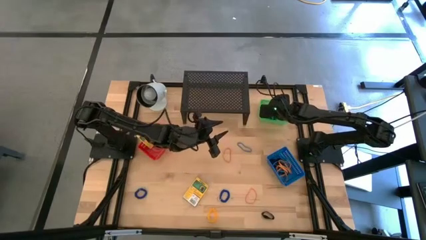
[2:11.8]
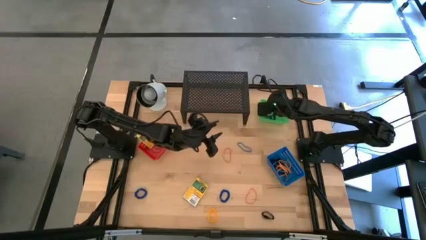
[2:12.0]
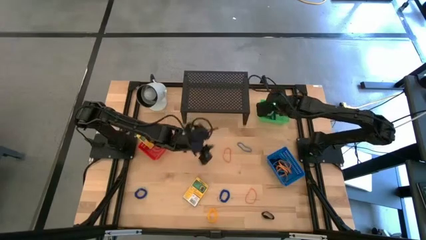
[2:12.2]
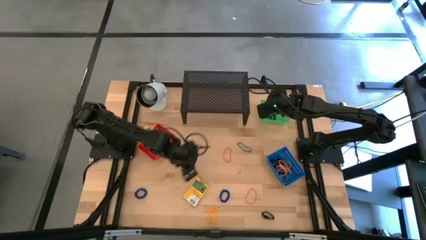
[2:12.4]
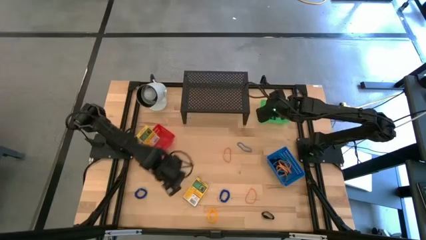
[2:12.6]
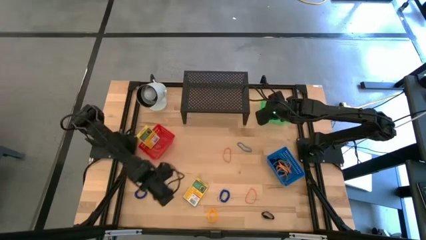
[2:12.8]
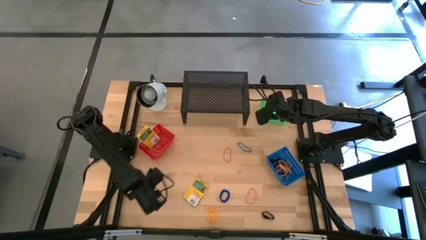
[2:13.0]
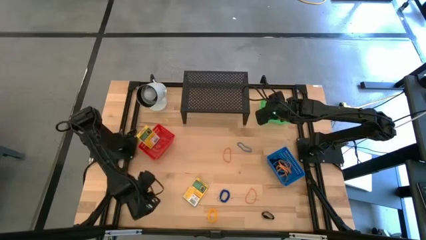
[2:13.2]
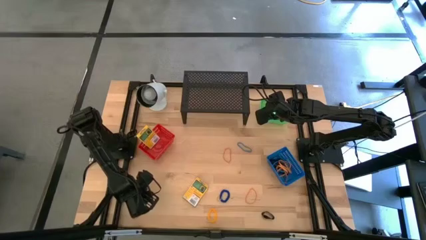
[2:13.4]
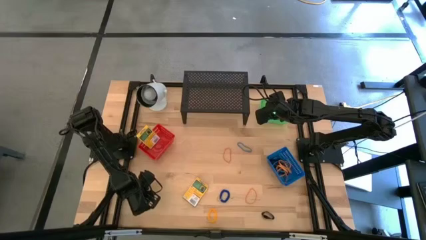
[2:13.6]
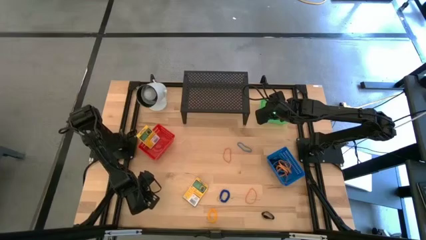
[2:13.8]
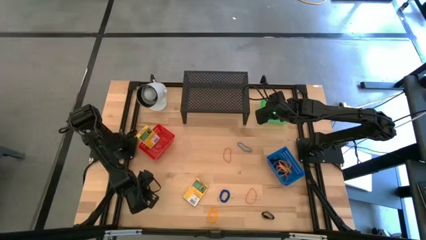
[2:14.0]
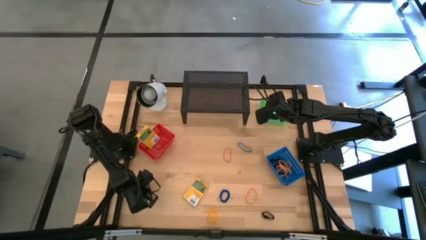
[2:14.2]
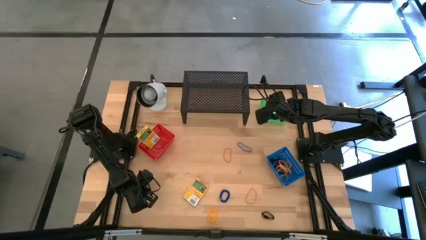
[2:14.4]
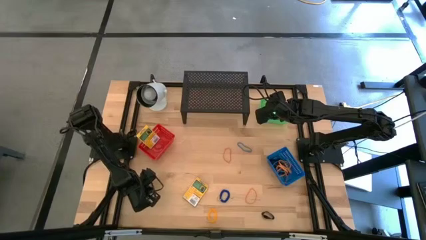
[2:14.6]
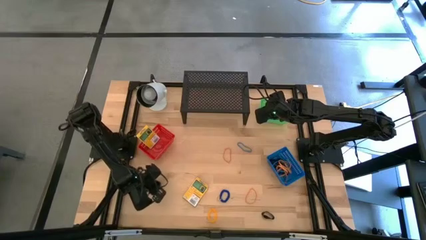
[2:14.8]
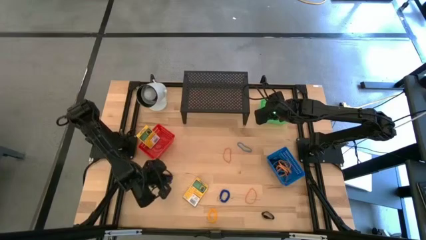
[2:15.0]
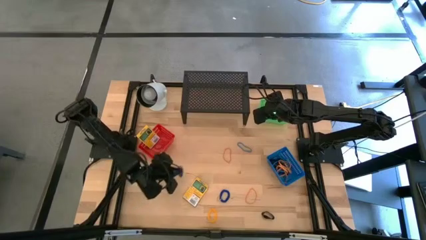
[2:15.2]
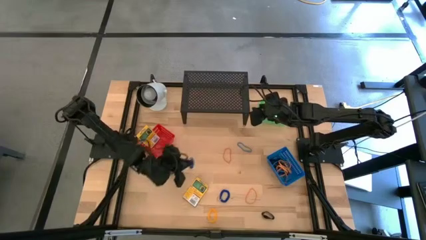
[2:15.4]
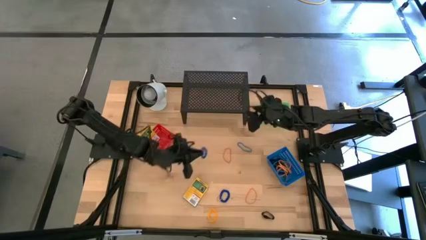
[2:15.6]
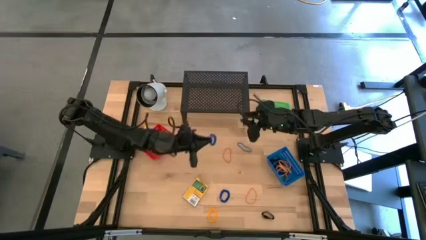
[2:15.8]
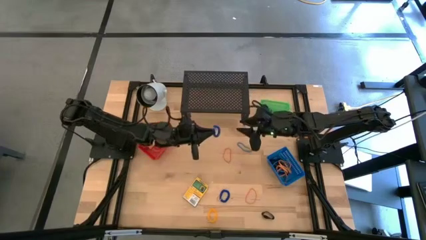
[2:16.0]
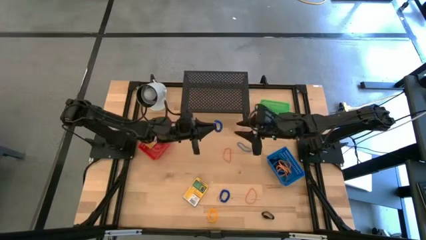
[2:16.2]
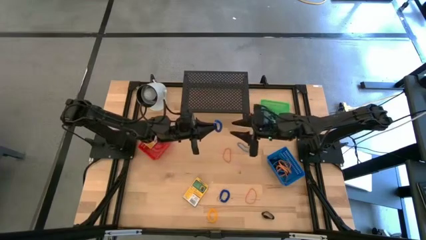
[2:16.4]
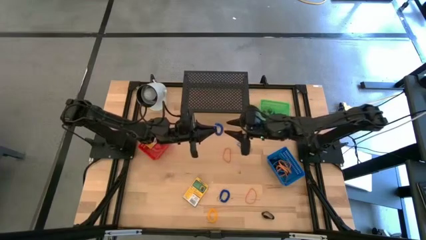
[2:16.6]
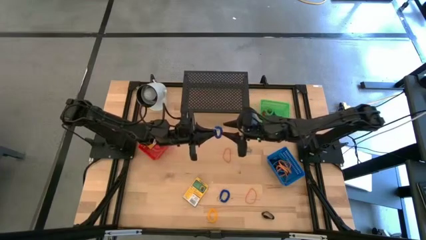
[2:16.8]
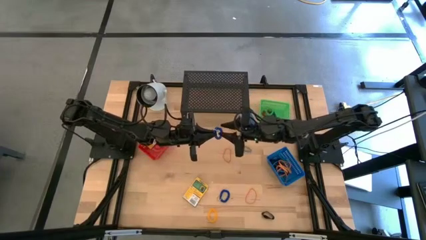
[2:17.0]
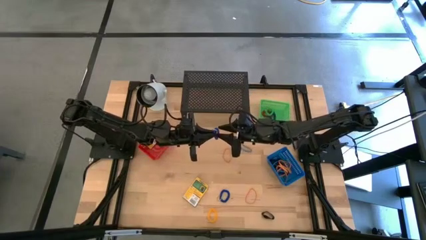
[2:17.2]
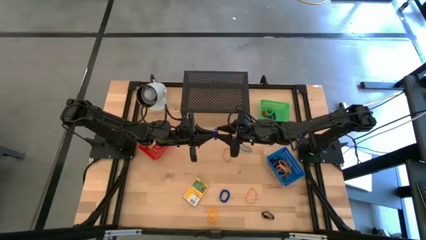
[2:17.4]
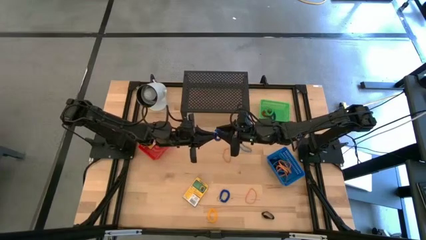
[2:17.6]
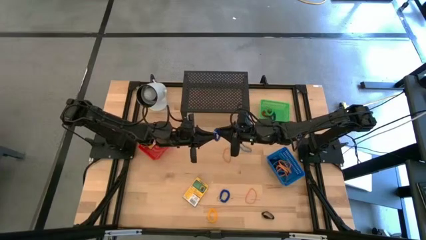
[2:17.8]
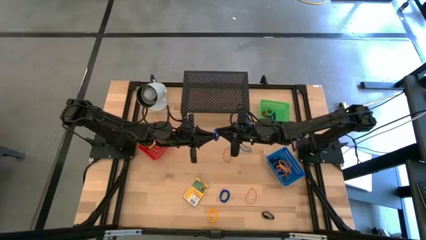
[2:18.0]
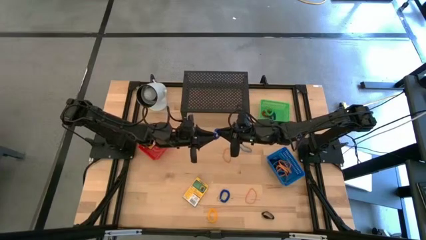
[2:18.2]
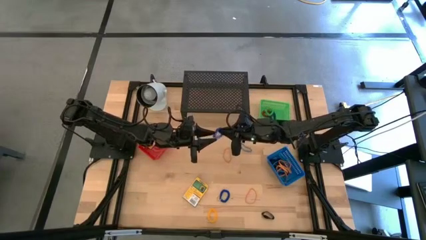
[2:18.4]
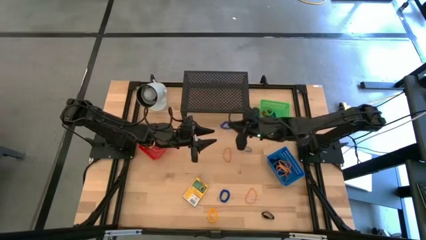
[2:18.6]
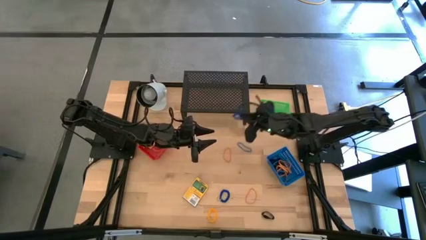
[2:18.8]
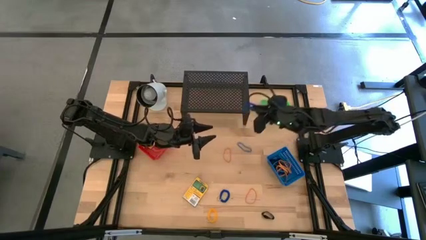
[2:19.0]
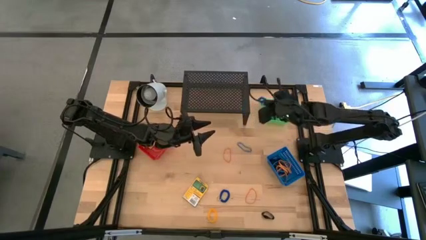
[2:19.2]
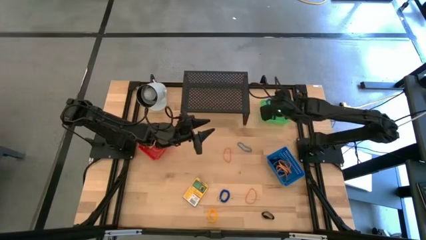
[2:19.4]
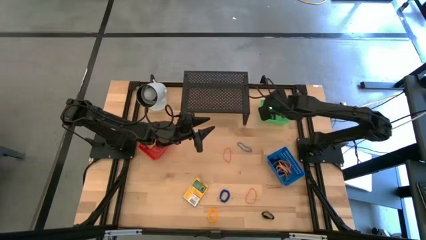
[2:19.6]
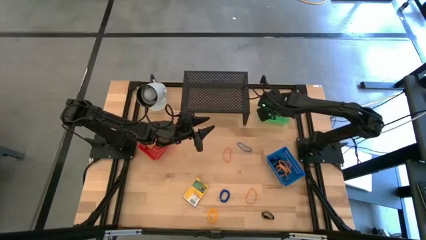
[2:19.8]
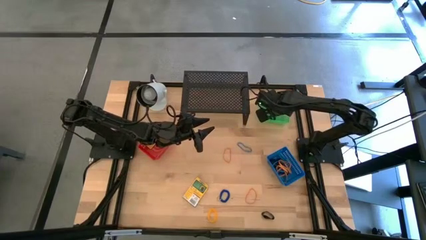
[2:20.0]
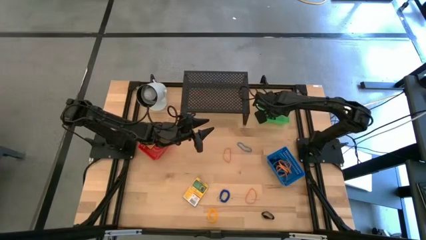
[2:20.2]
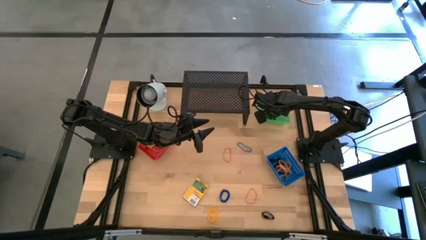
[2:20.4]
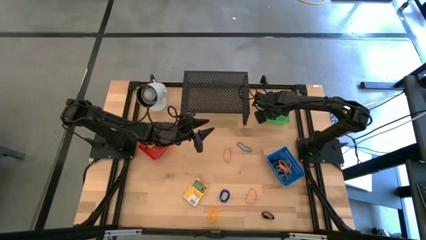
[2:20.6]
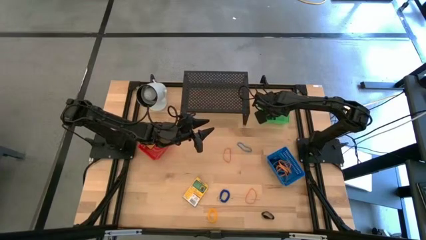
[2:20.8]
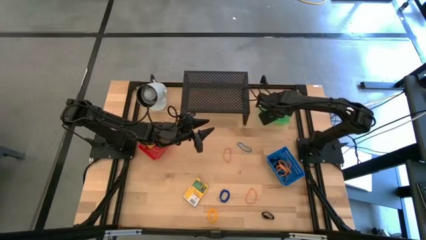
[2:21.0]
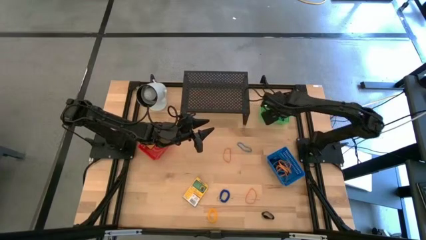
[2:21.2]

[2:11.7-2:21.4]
Task: Pick & Place Office Desk Supplies
Put the blue spring keychain into the green bin

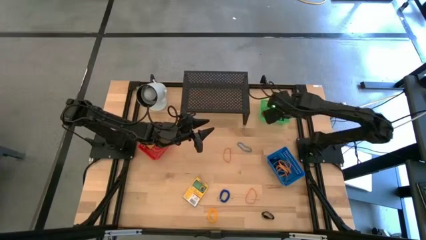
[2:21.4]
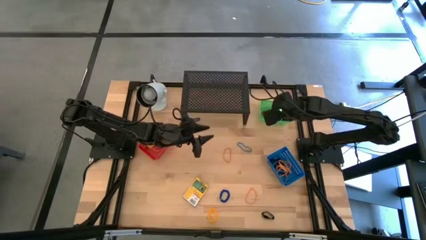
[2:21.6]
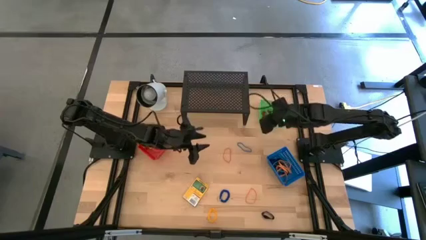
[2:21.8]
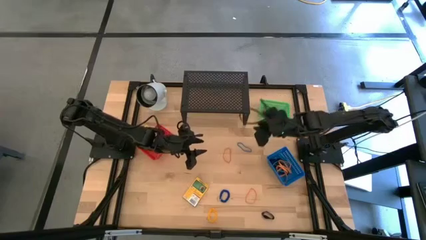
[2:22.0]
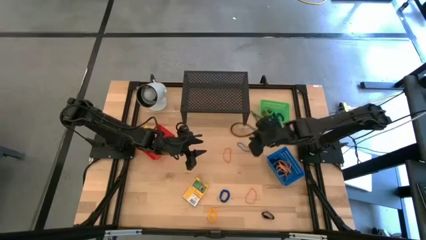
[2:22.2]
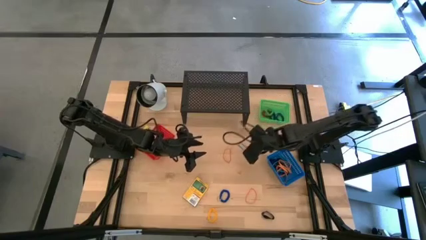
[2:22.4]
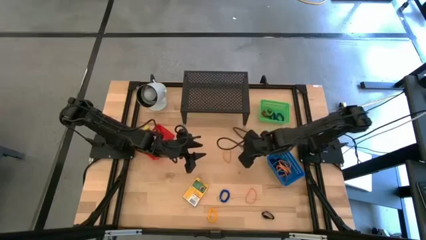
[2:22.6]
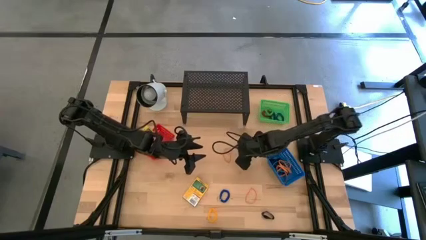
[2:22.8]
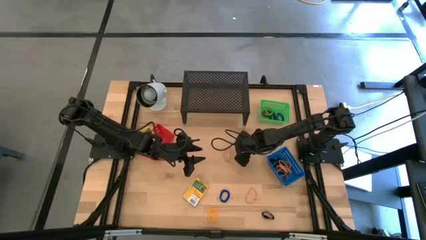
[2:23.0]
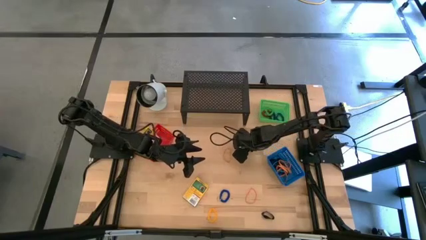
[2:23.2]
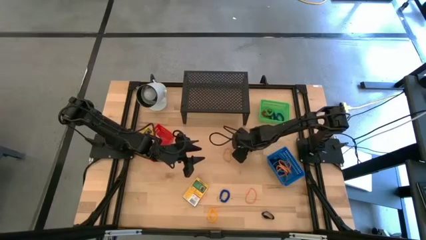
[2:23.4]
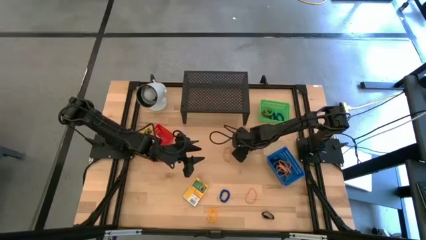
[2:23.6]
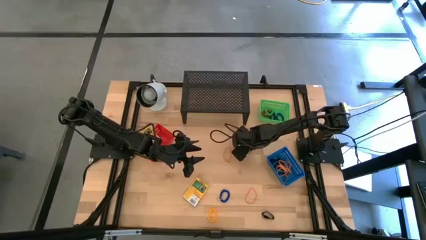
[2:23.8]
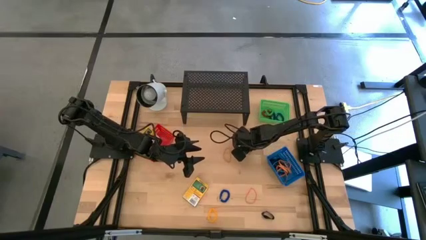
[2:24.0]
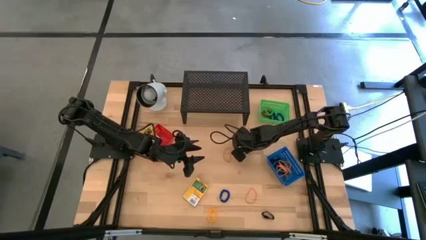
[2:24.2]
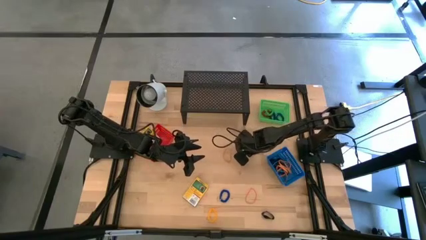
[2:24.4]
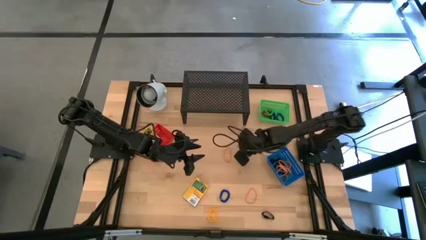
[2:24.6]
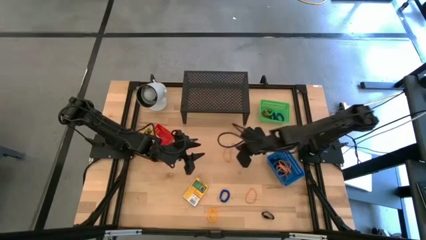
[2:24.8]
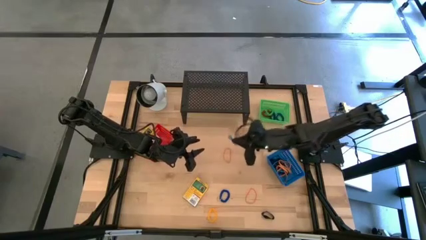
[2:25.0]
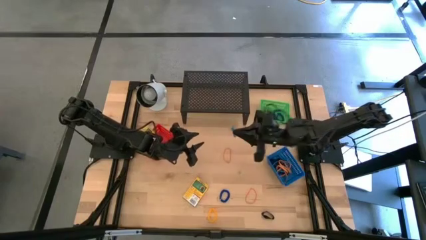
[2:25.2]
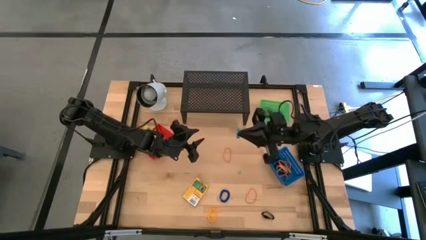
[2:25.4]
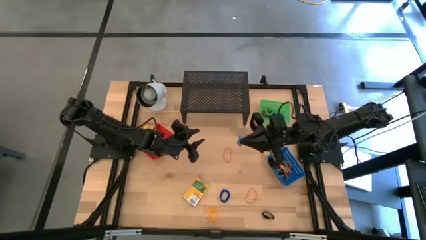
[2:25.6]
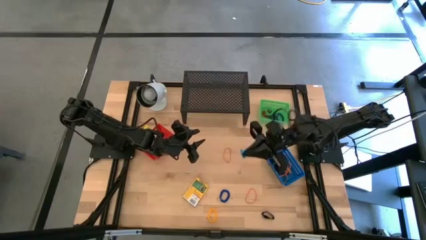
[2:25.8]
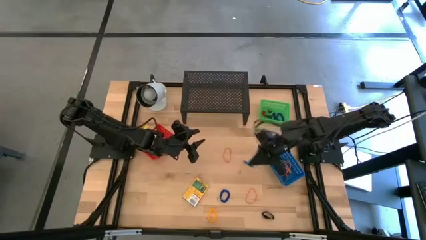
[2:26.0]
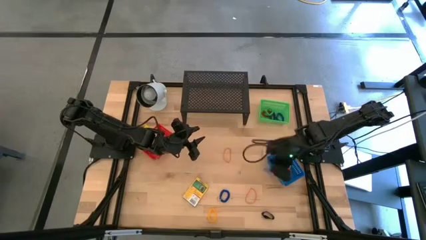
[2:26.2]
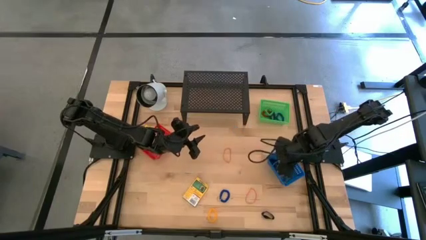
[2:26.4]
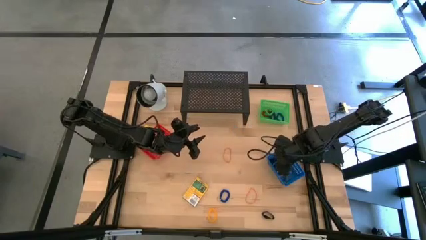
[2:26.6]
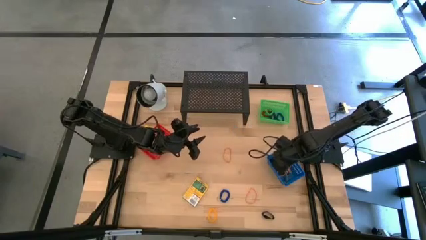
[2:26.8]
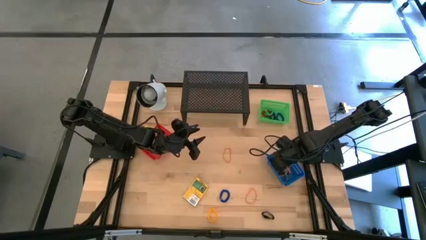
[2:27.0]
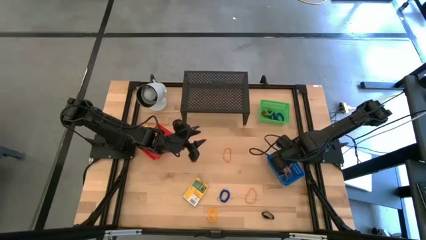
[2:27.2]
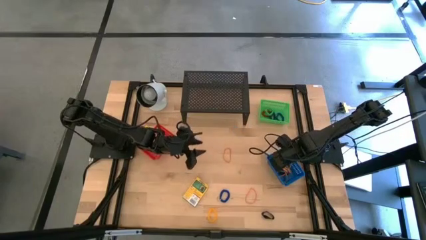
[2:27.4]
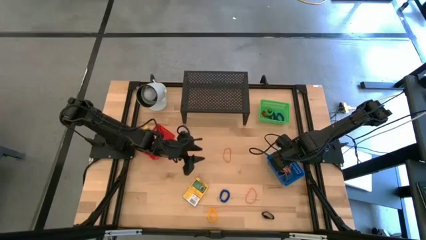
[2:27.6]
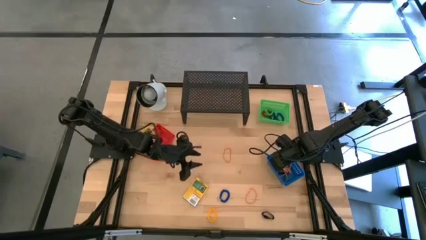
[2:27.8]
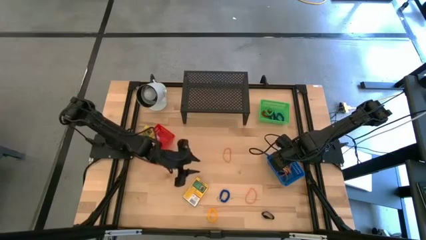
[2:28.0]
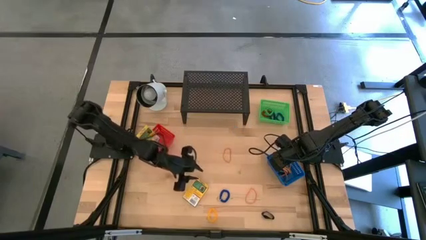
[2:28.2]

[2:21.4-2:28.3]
Put the blue rubber band into the blue bin
